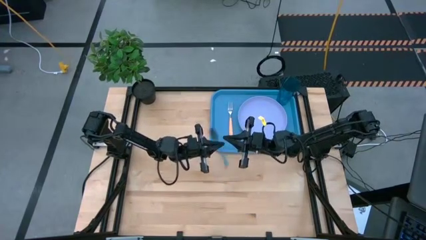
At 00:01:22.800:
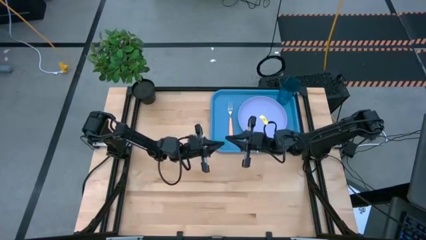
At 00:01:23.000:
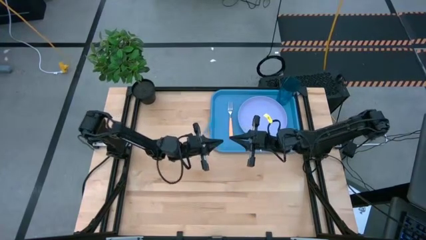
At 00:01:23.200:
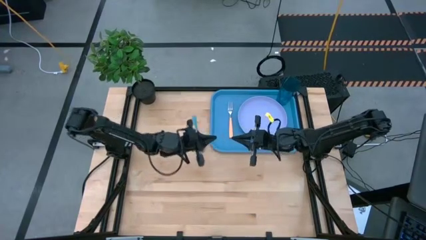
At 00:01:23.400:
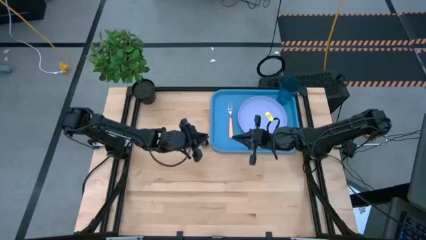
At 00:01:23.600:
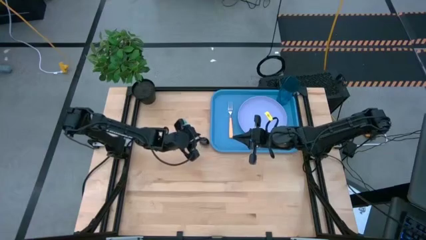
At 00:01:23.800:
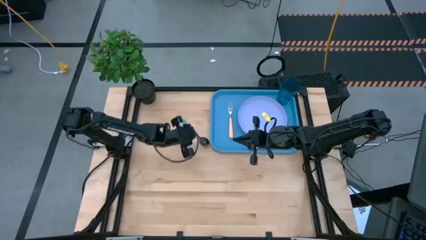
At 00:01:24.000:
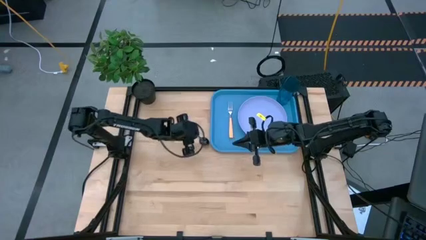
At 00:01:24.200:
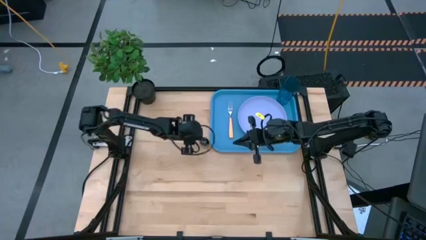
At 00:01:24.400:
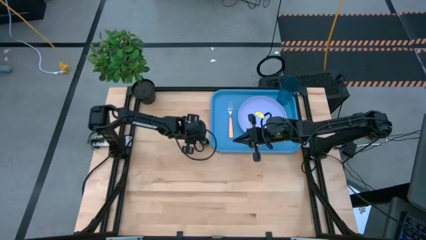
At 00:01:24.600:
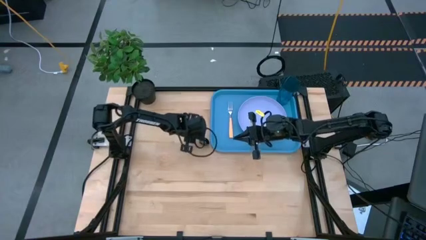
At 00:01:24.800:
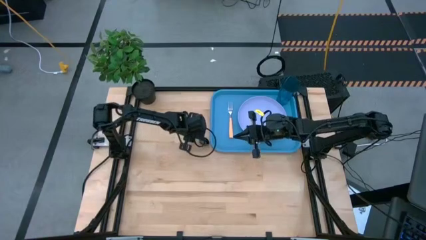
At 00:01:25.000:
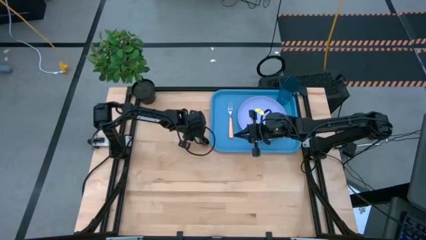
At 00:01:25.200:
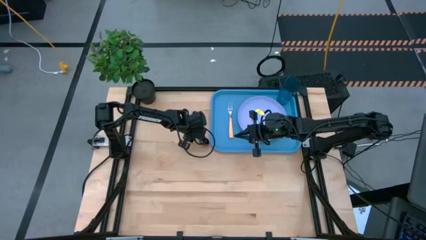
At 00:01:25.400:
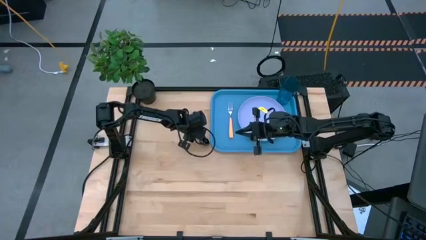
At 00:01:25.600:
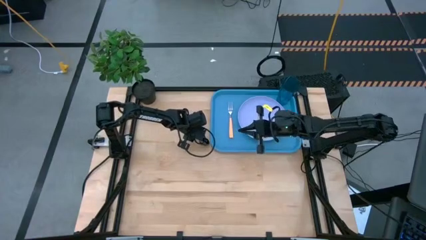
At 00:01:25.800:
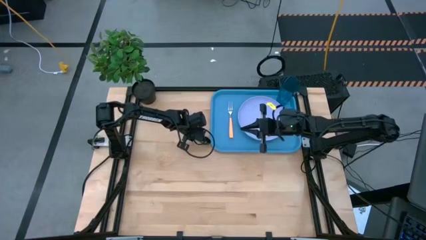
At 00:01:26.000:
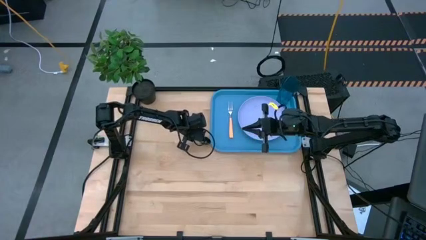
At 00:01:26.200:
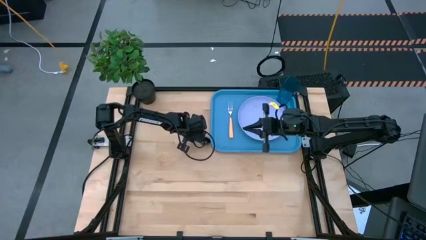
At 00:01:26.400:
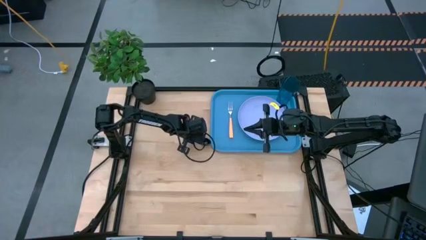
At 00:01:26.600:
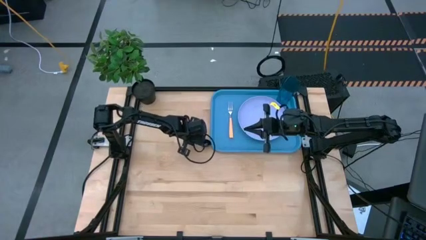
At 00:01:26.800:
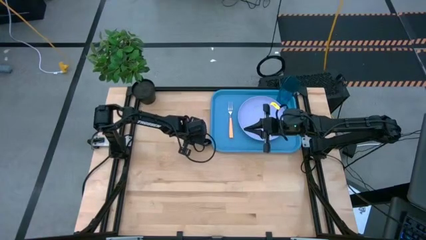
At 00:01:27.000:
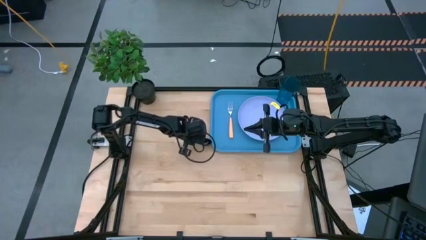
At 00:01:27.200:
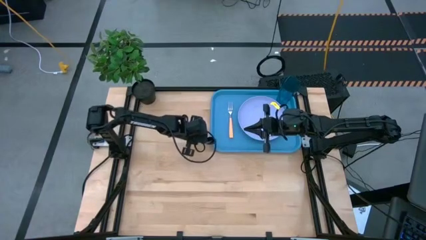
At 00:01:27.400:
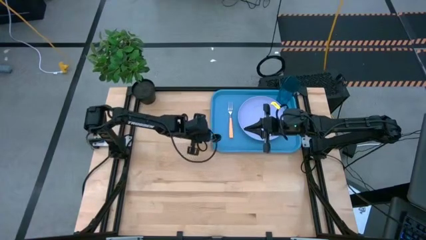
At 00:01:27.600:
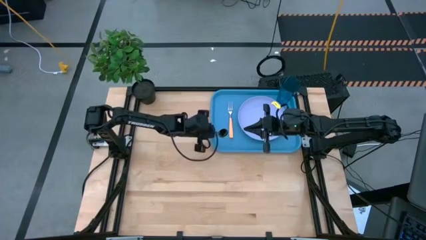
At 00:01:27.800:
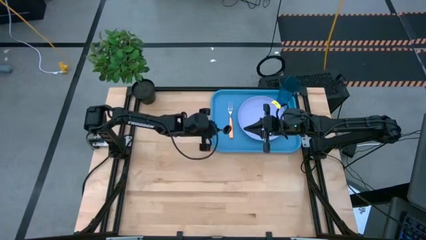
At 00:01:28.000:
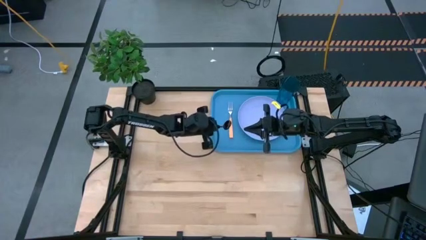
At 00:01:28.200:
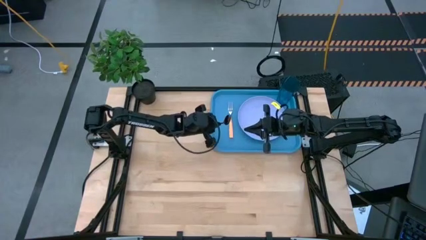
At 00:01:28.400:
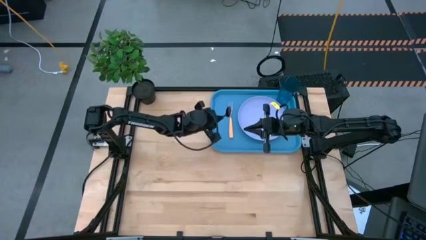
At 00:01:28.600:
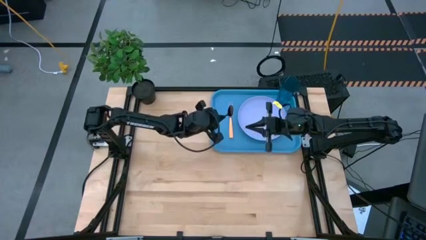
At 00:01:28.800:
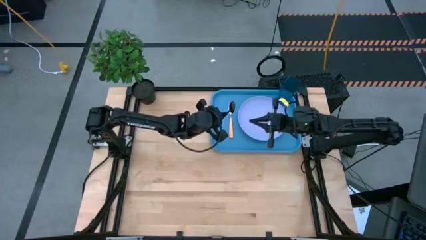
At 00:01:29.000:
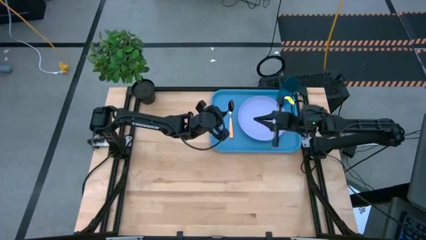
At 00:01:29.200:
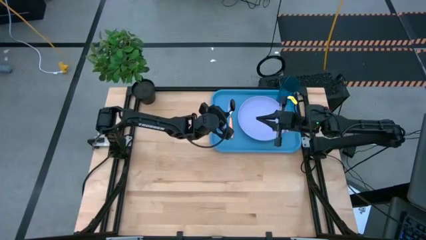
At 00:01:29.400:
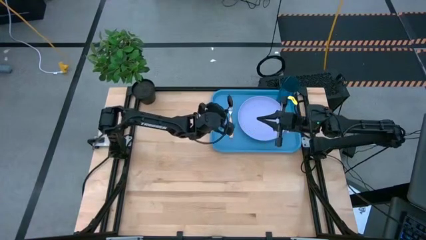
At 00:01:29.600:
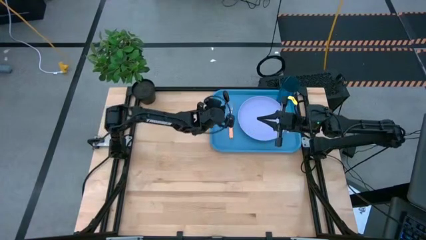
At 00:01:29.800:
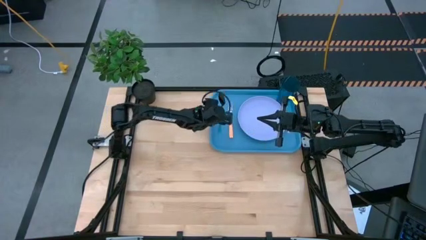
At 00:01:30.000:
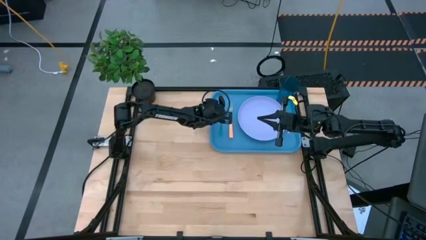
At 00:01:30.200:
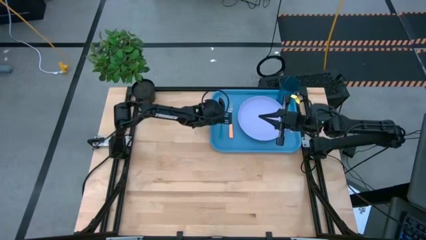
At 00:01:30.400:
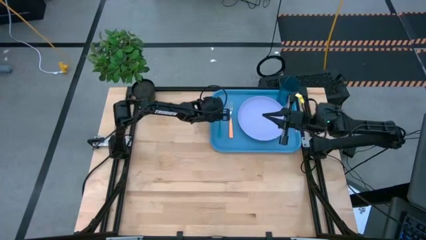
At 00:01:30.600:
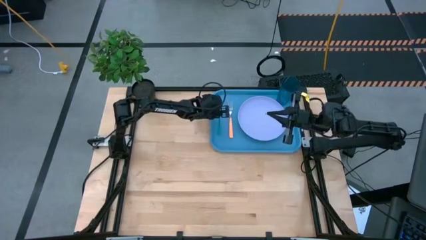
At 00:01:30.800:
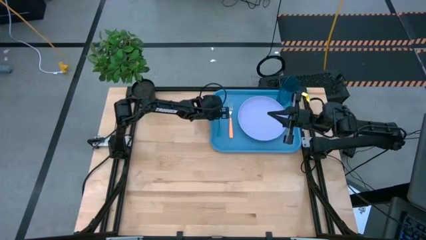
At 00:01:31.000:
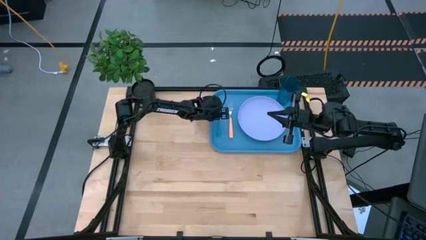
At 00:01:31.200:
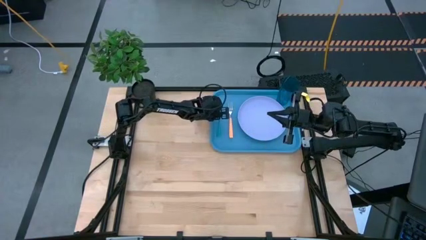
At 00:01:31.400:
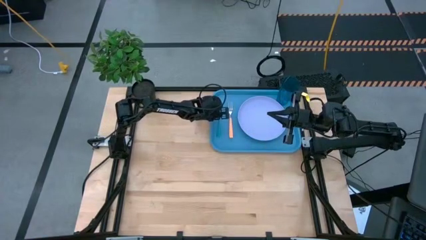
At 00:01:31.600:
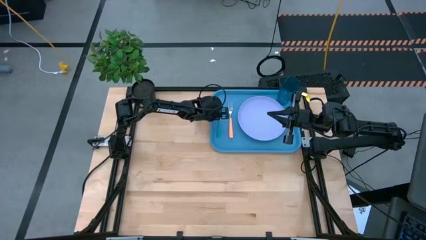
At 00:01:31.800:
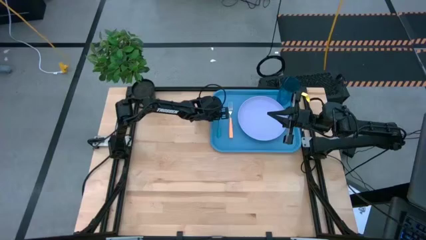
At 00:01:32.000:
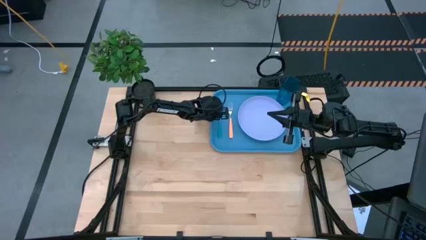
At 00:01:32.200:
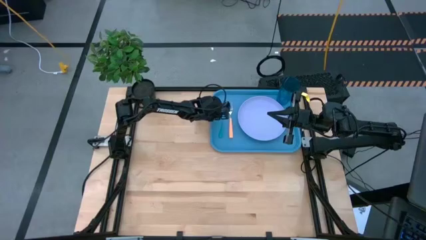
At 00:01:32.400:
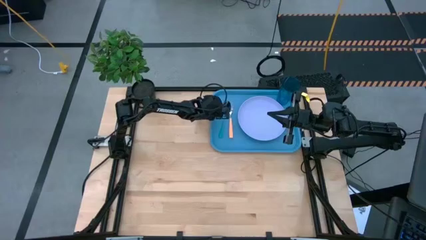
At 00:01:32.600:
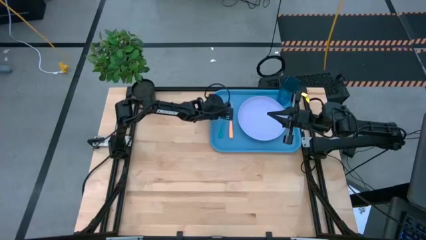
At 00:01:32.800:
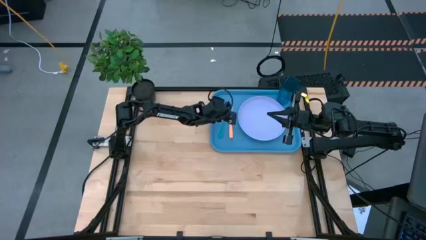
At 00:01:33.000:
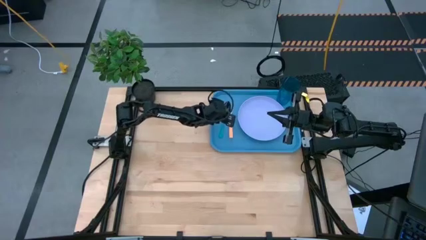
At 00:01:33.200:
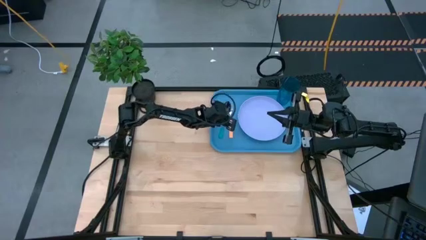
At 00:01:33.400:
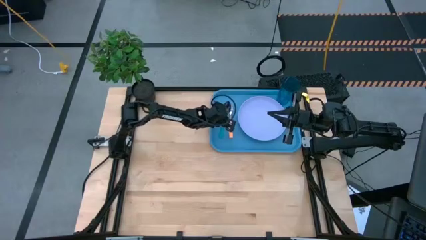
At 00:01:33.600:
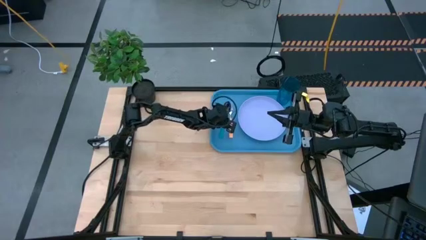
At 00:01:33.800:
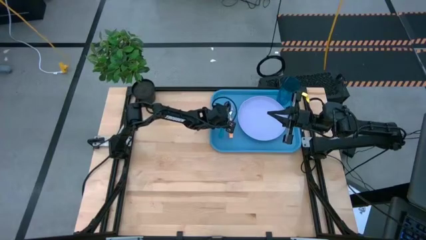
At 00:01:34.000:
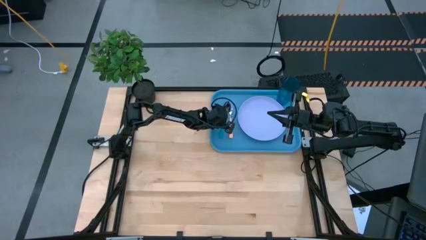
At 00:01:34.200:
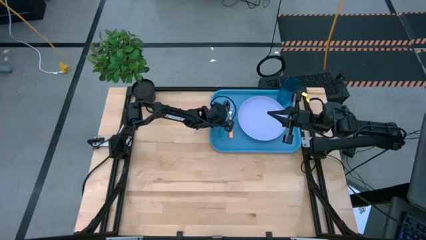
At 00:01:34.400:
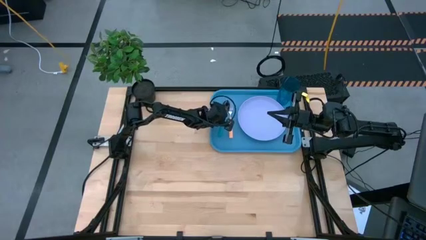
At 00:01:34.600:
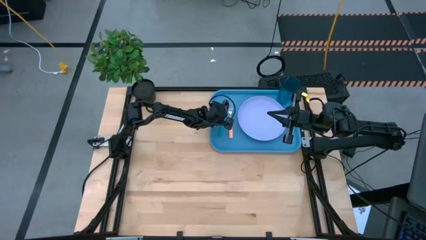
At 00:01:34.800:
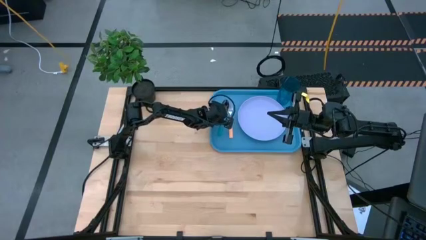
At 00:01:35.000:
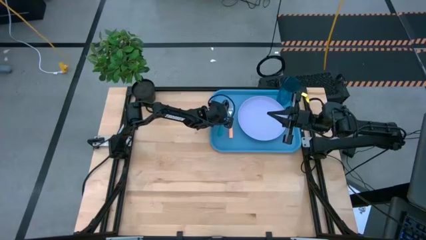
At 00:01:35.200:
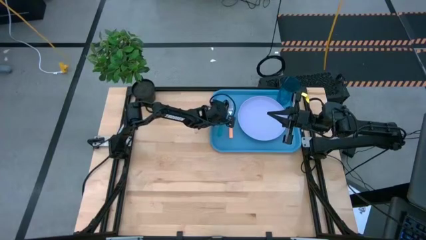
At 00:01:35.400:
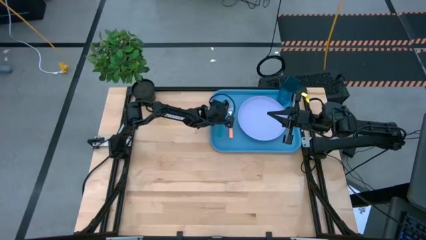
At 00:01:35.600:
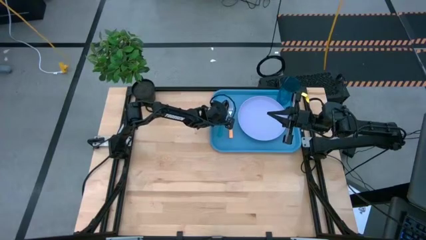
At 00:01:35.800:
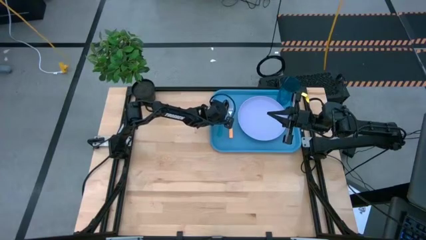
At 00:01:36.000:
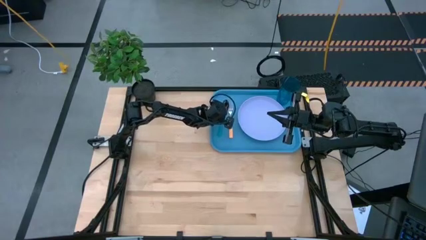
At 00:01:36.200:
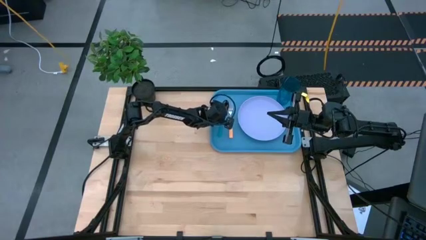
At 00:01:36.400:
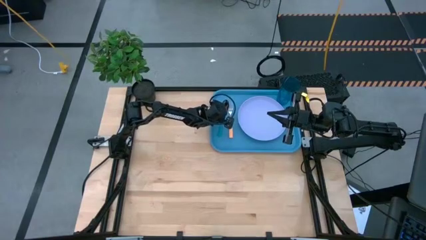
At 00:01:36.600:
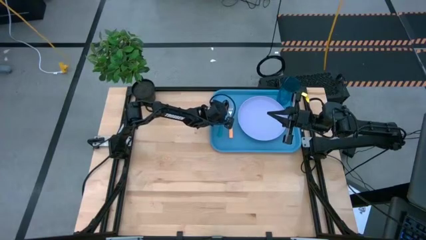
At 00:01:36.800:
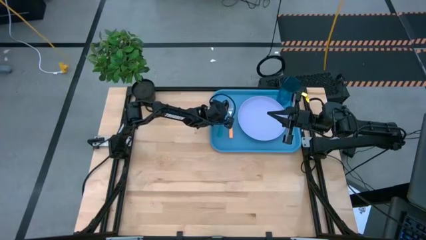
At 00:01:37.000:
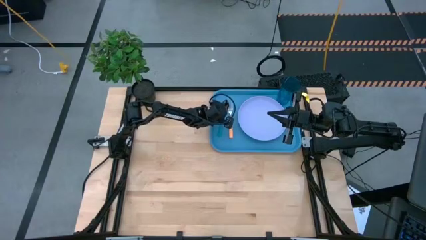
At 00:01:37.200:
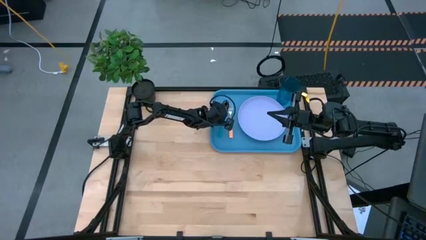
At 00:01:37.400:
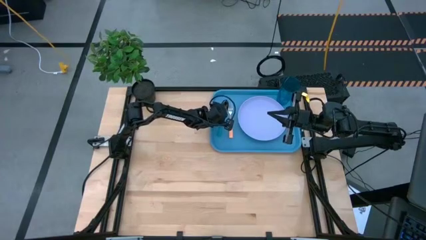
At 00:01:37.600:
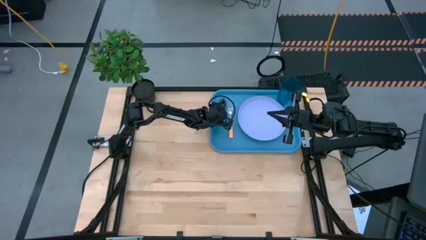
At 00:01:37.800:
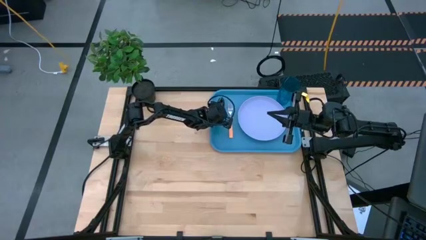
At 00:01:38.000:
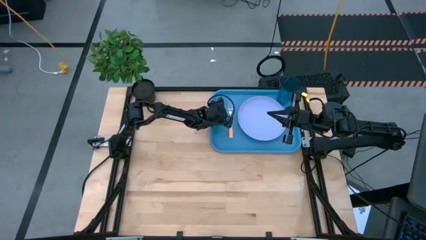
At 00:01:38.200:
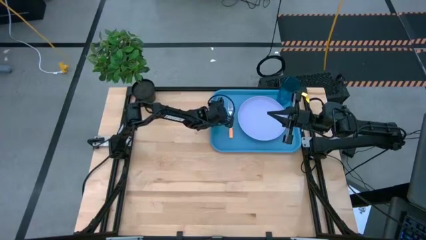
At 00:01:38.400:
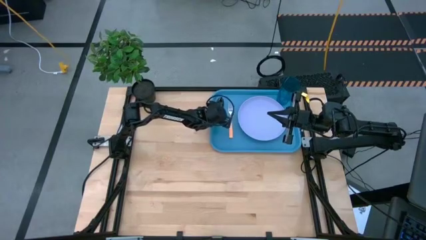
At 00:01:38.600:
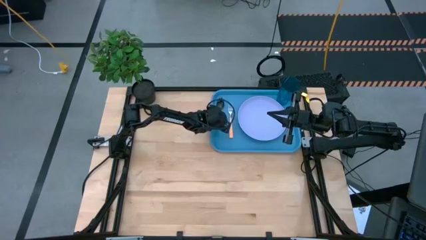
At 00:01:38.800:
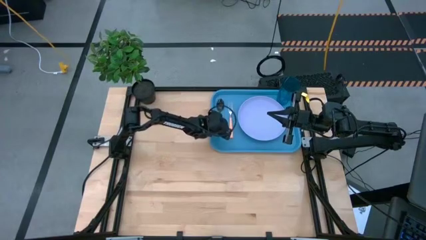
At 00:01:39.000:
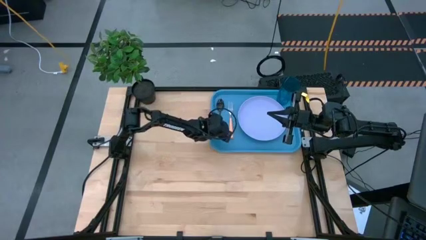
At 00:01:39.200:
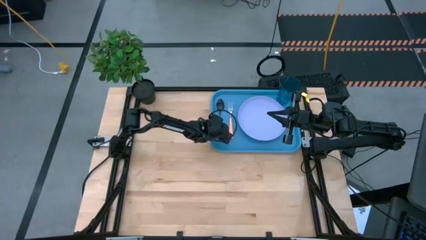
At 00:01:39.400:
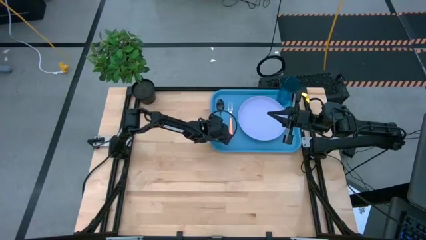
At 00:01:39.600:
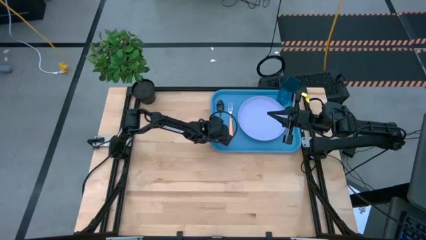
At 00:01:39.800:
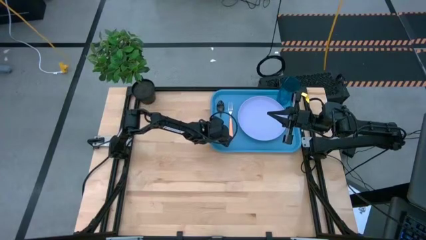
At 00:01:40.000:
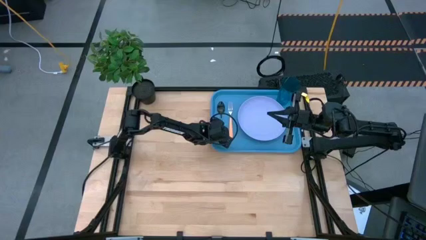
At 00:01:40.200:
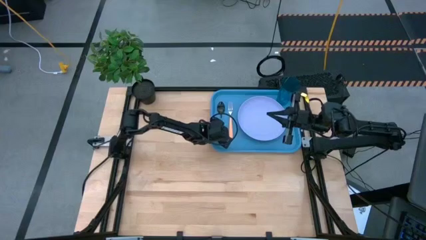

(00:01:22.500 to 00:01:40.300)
Task: Pick and place plate/cup/fork/spoon on tray
Put the blue spoon on the blue tray to the left of the brown fork
